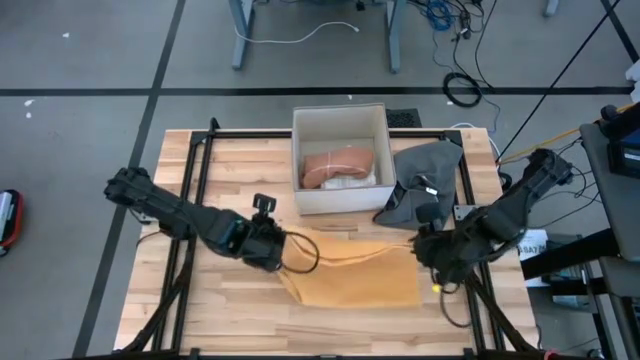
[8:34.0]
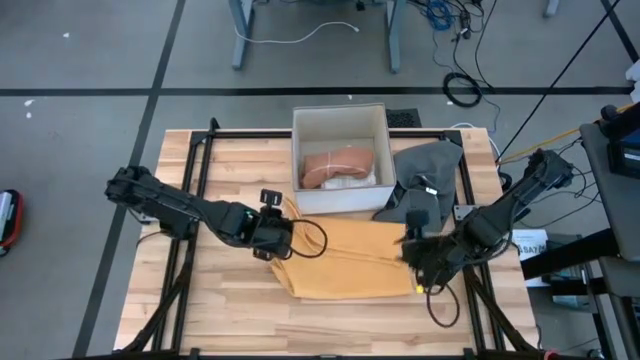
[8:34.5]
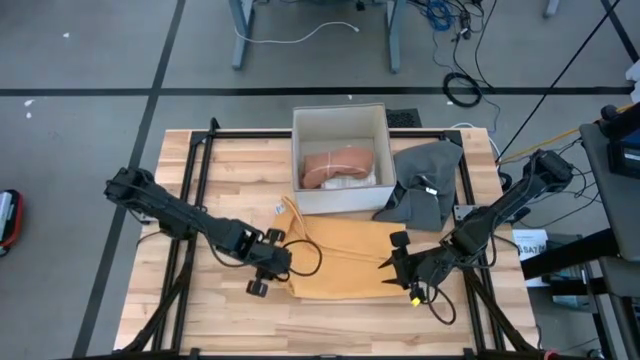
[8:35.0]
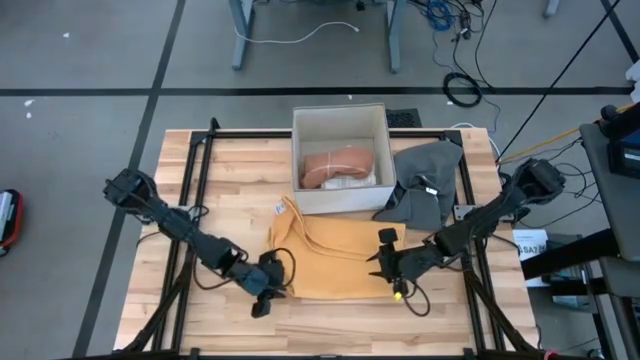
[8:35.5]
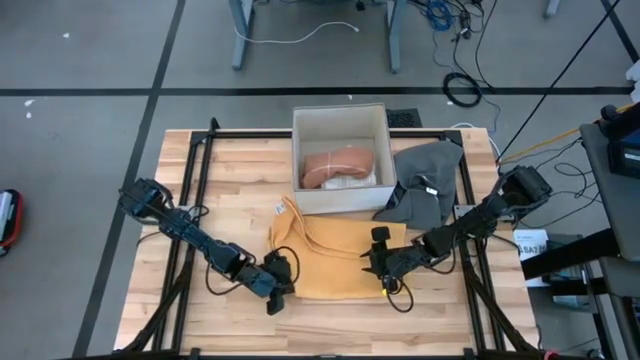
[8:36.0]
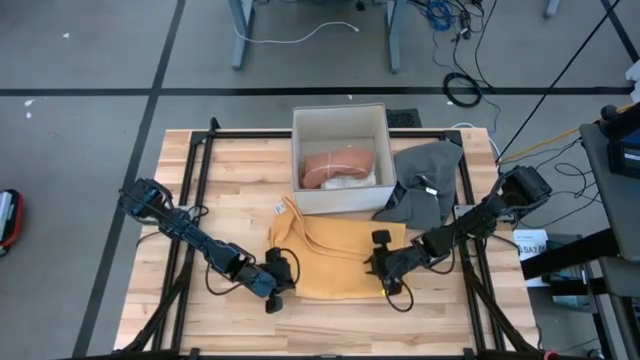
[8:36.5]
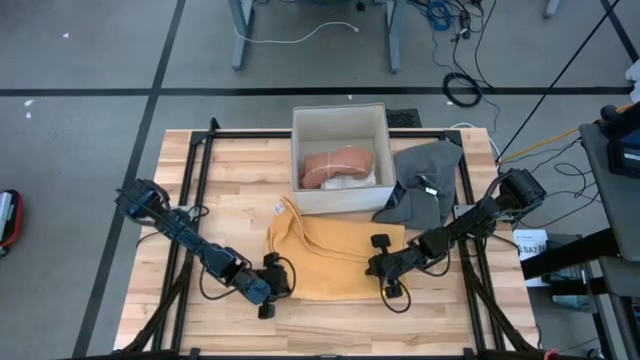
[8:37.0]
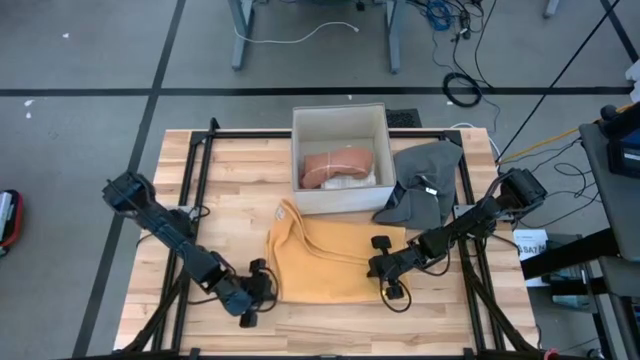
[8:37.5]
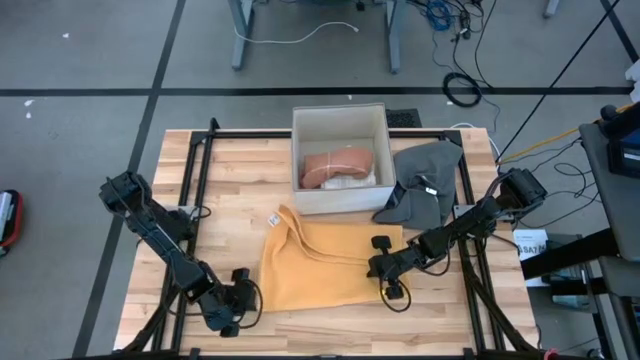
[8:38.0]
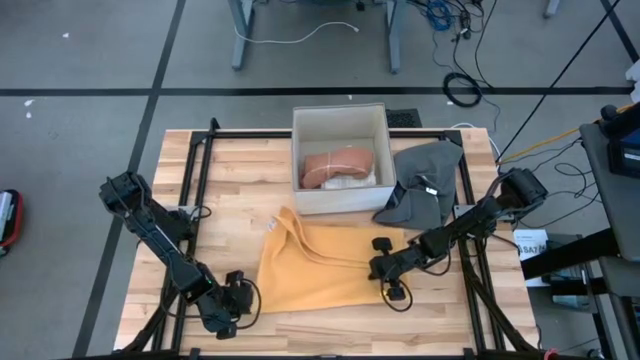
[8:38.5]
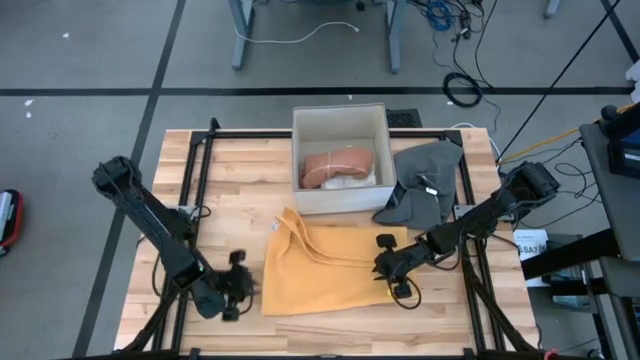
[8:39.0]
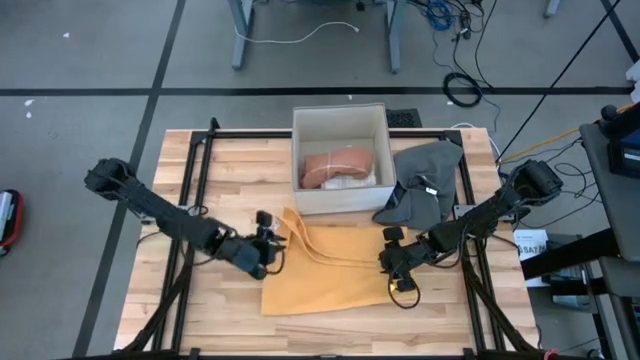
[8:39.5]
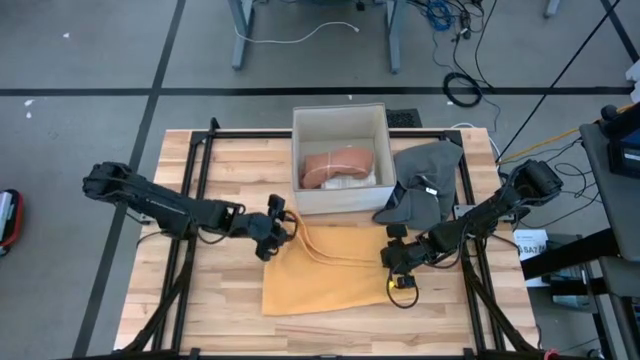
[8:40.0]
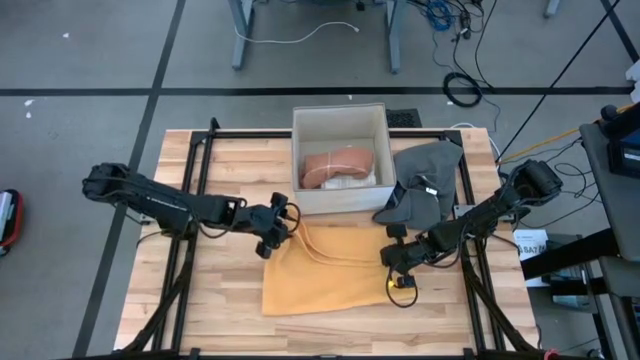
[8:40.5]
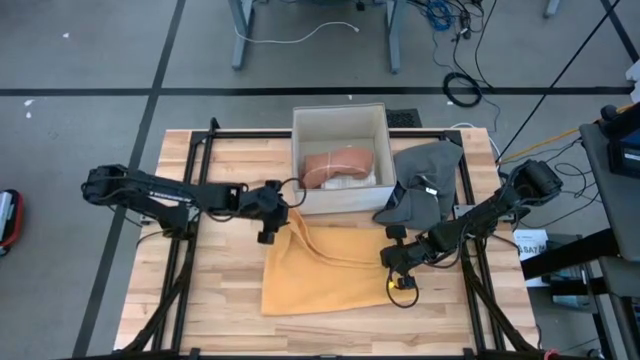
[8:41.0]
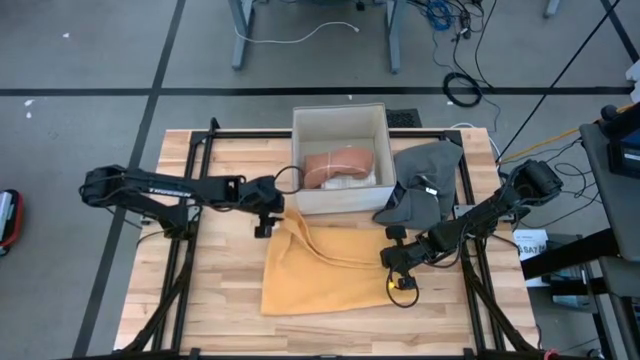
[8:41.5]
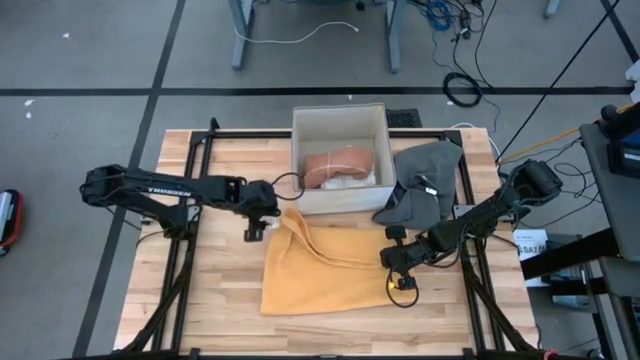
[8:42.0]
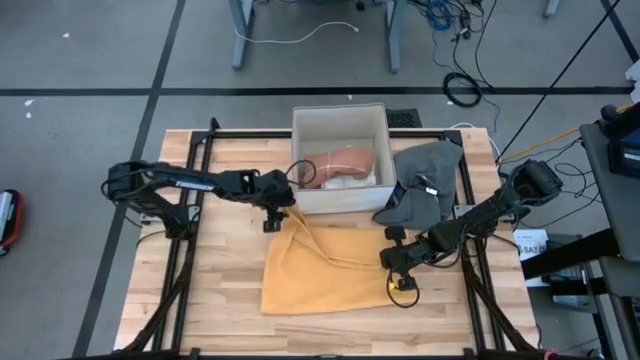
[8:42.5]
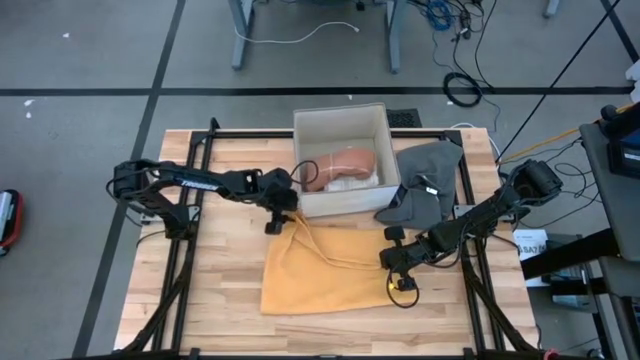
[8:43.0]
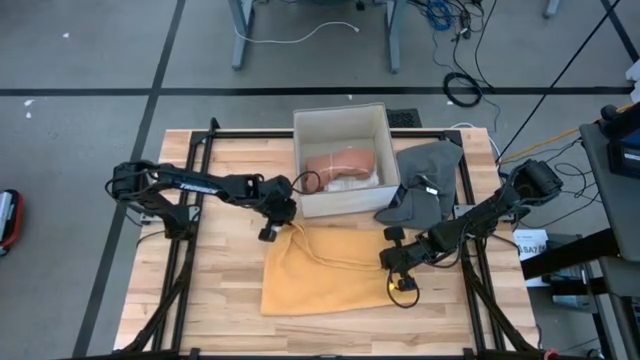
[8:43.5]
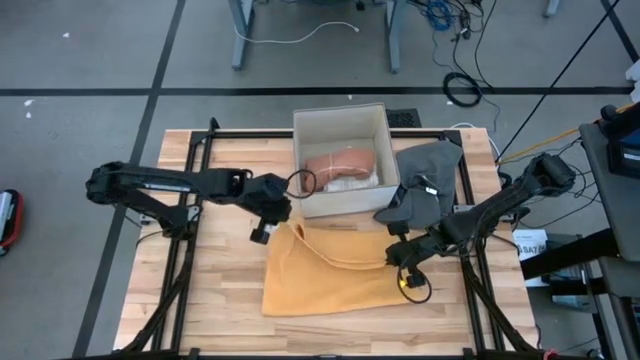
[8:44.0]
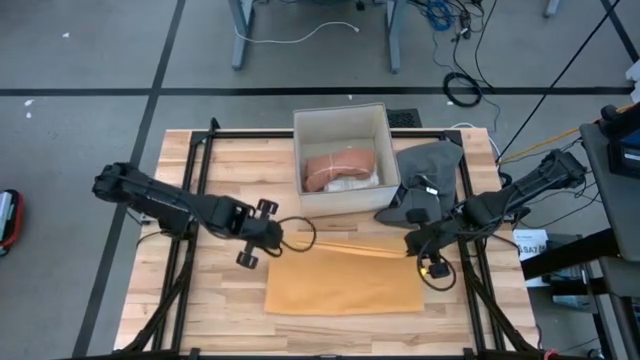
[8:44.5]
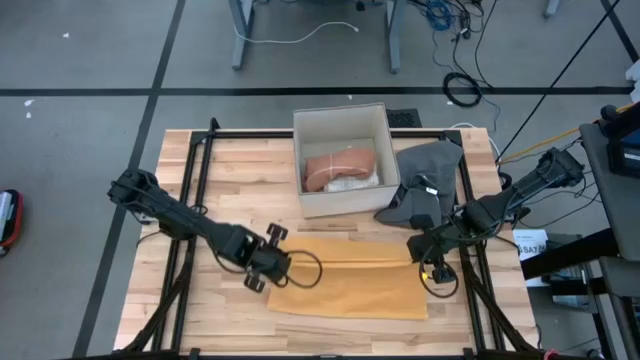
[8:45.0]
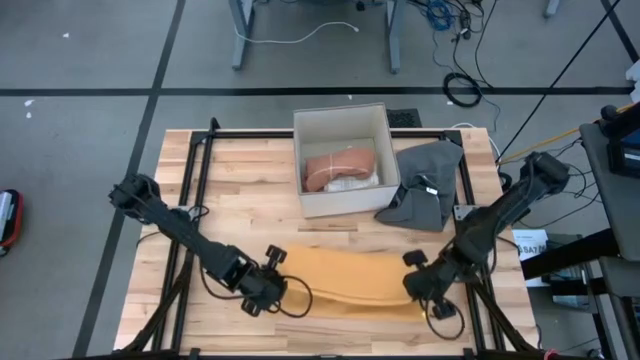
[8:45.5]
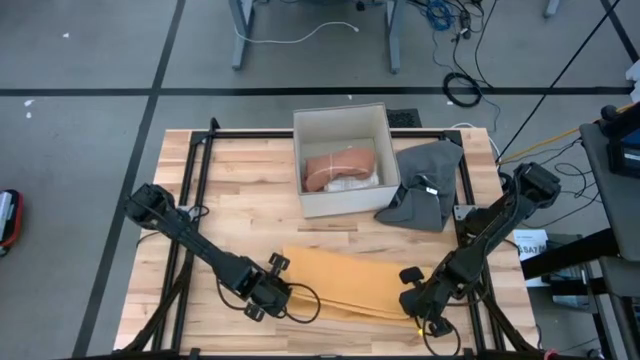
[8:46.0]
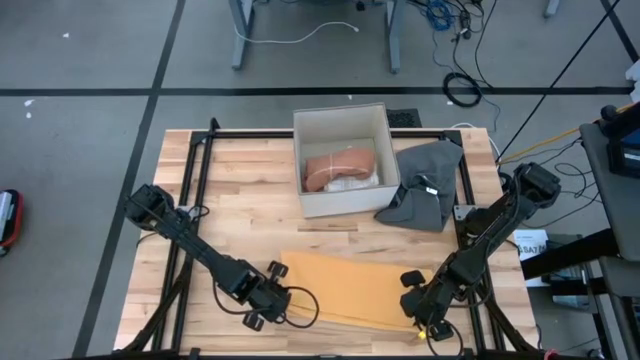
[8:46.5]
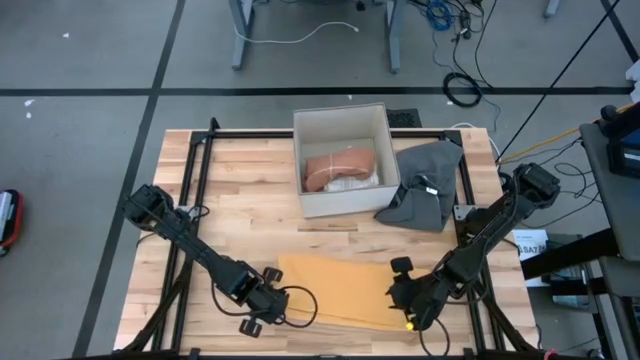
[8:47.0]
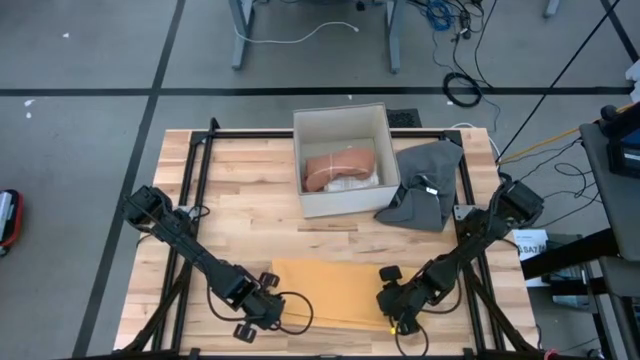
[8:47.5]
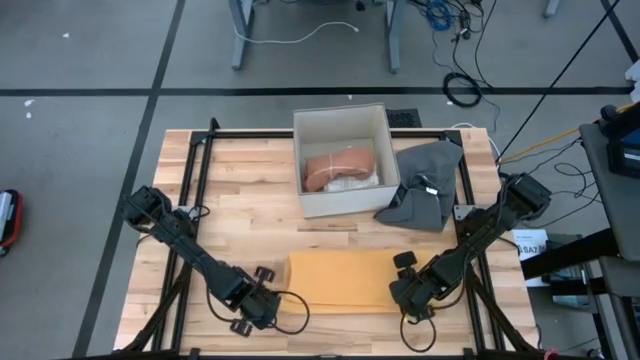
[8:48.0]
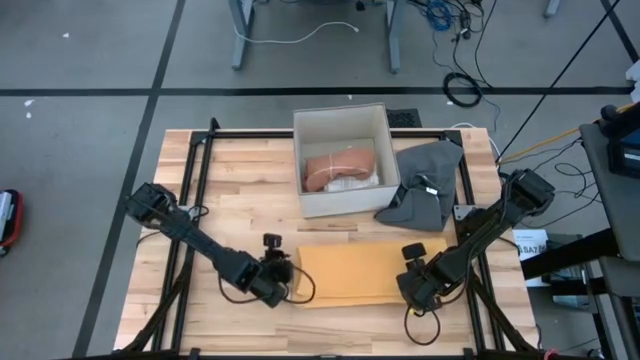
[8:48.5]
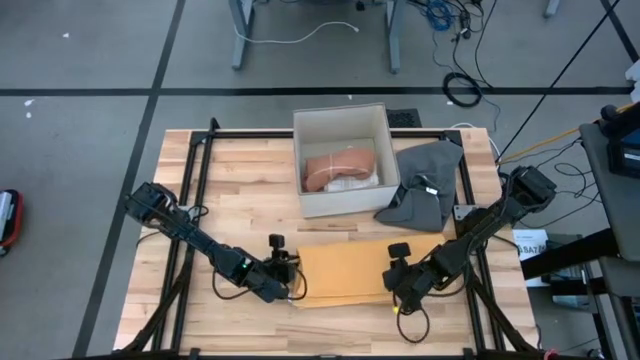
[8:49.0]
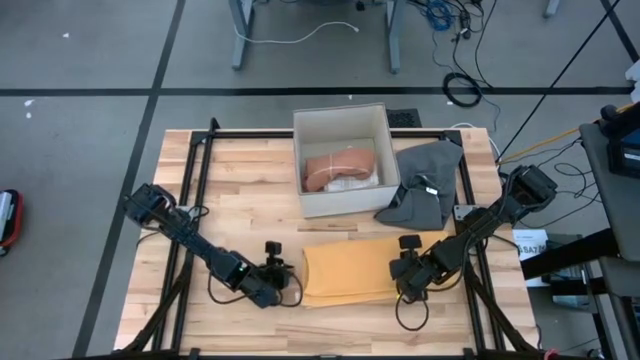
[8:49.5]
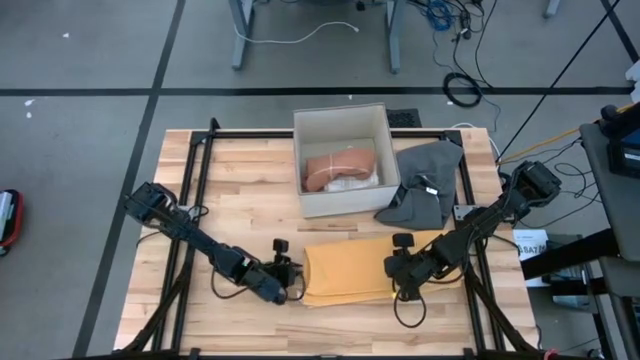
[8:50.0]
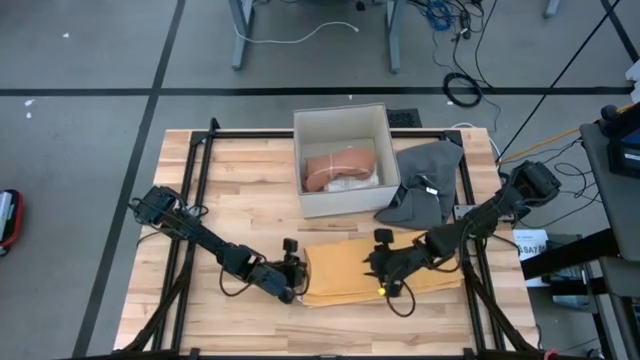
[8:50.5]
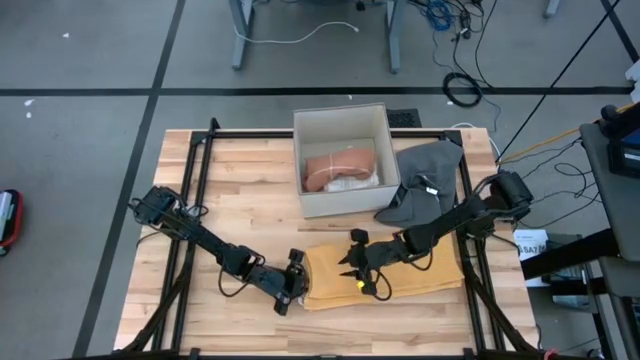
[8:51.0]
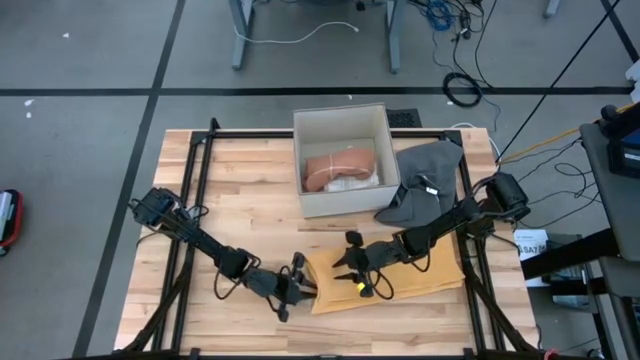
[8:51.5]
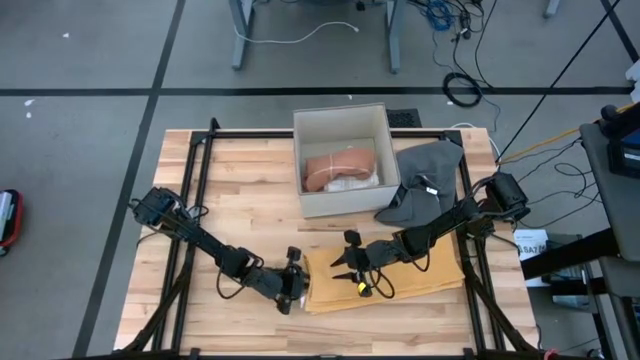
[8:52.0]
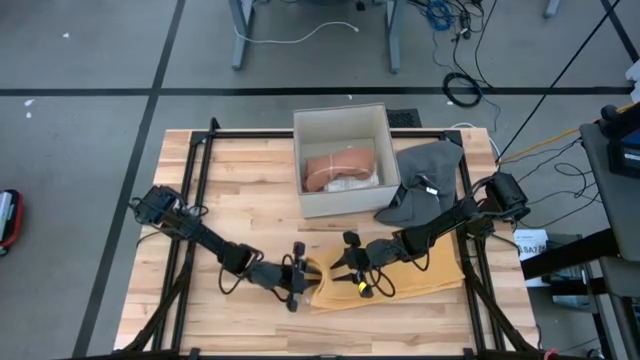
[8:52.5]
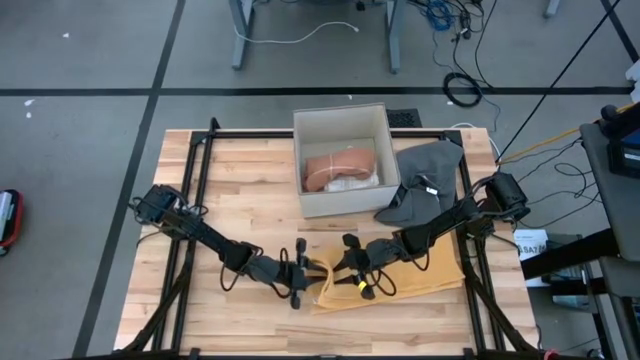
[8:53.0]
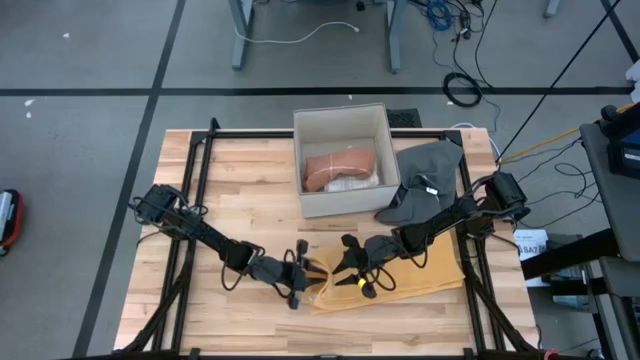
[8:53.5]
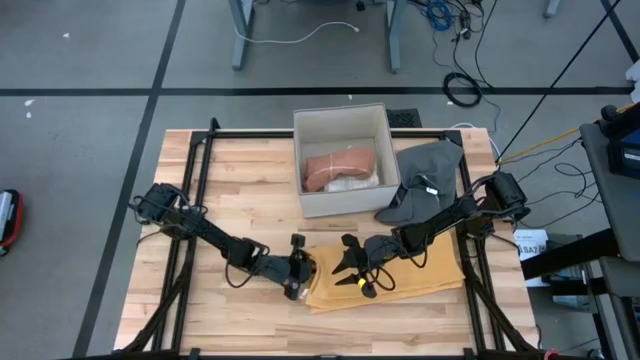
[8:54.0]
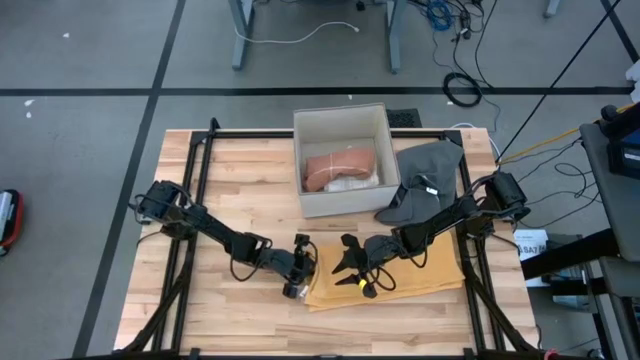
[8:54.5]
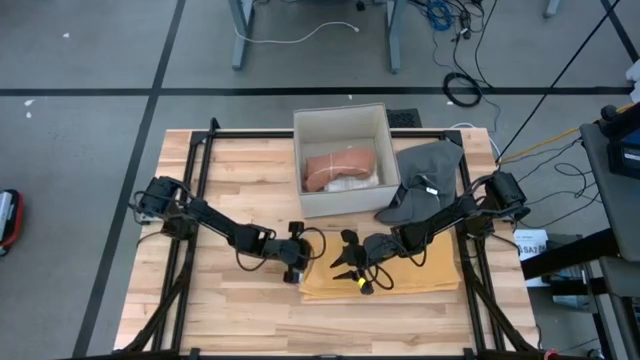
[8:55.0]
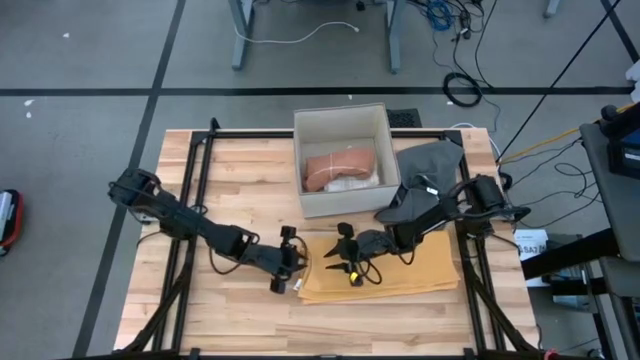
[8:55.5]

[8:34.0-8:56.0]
Task: Fold towel
Fold the orange towel
